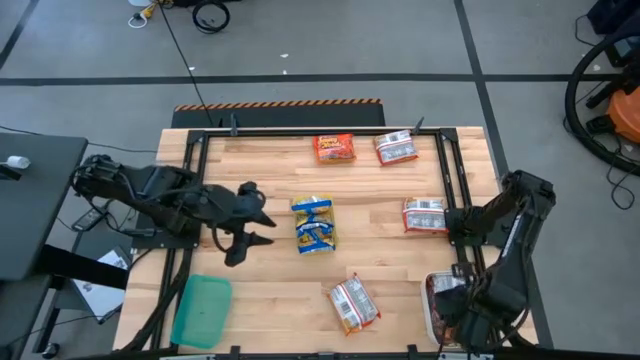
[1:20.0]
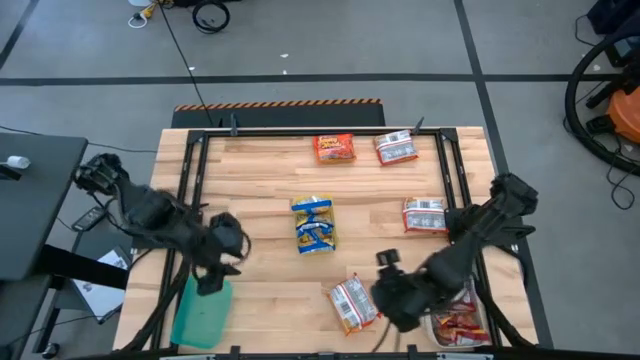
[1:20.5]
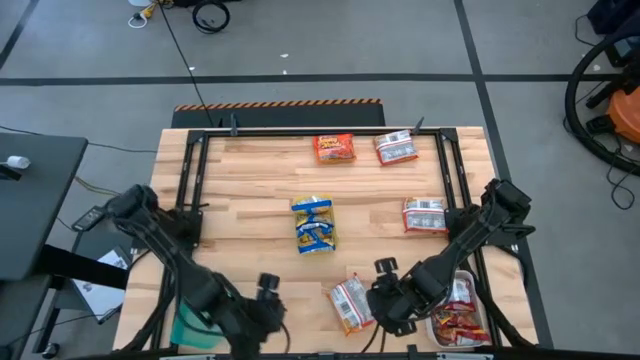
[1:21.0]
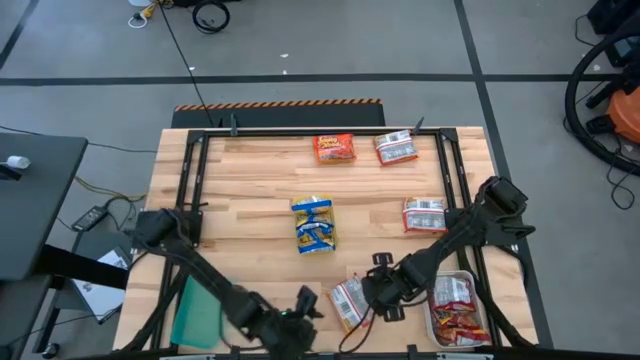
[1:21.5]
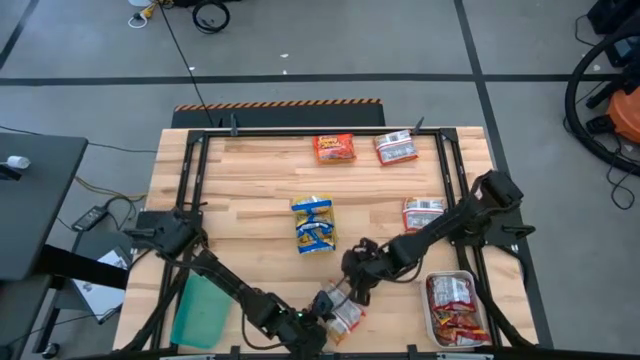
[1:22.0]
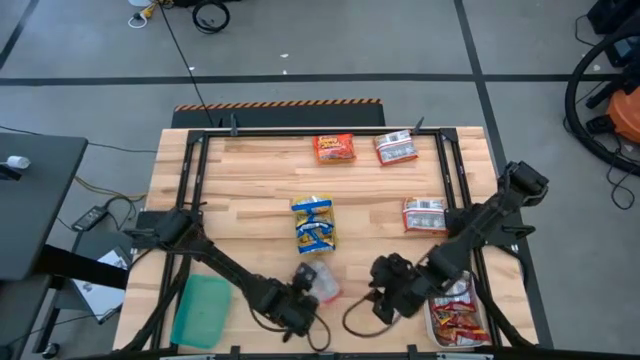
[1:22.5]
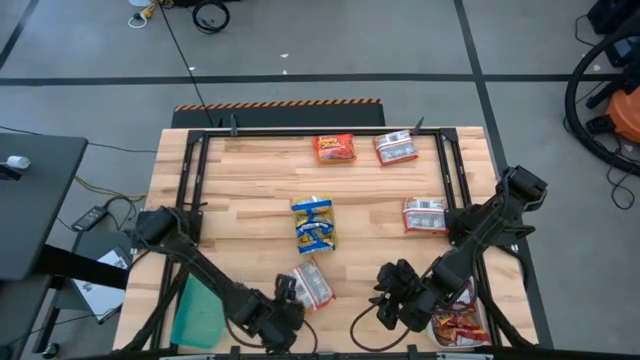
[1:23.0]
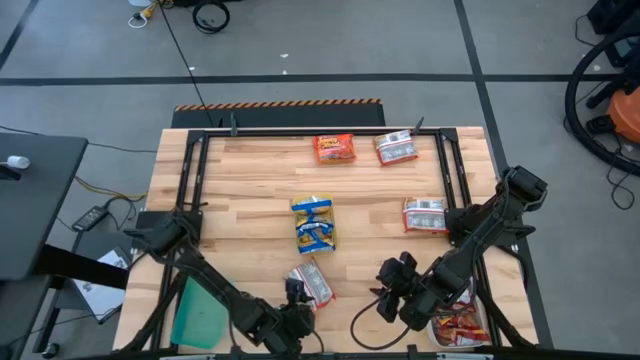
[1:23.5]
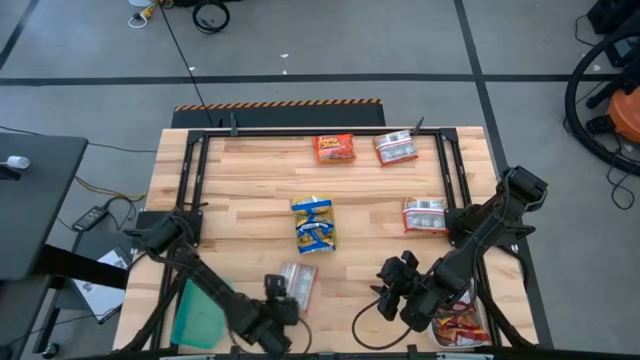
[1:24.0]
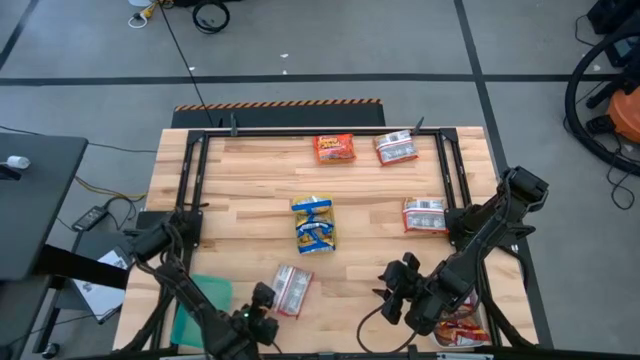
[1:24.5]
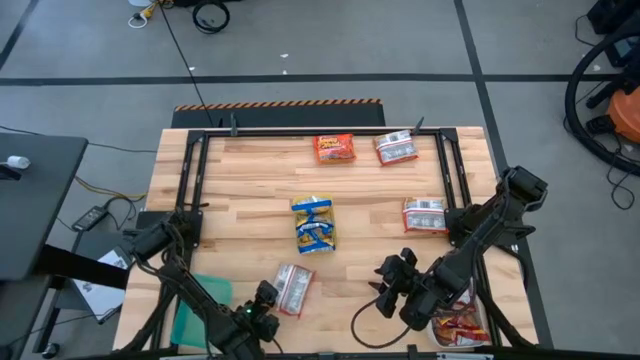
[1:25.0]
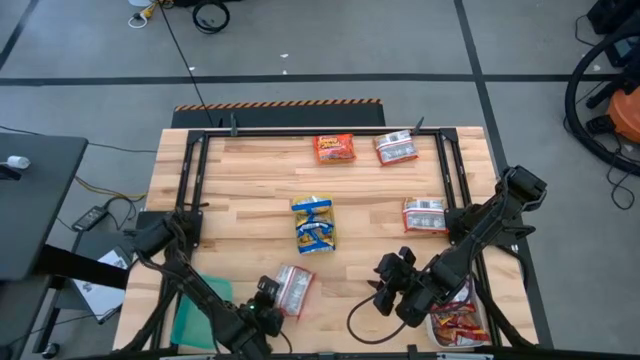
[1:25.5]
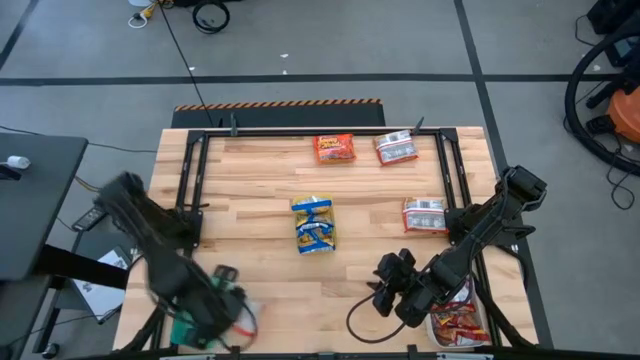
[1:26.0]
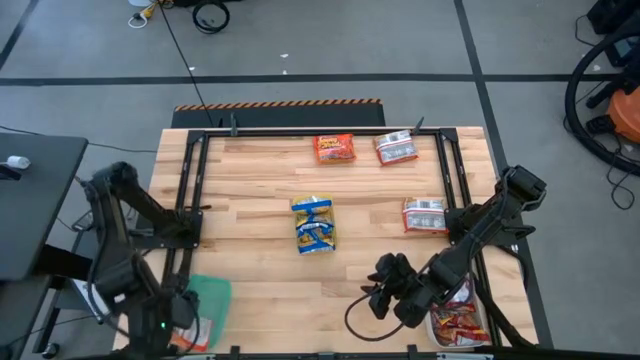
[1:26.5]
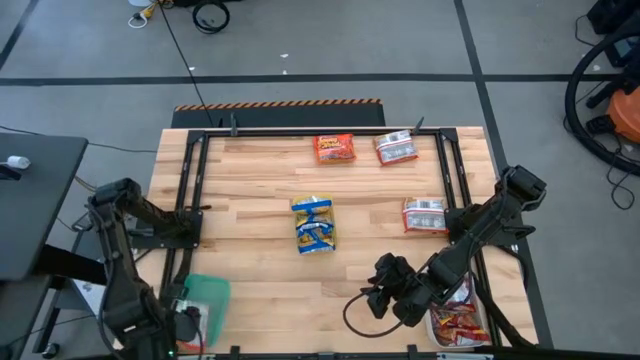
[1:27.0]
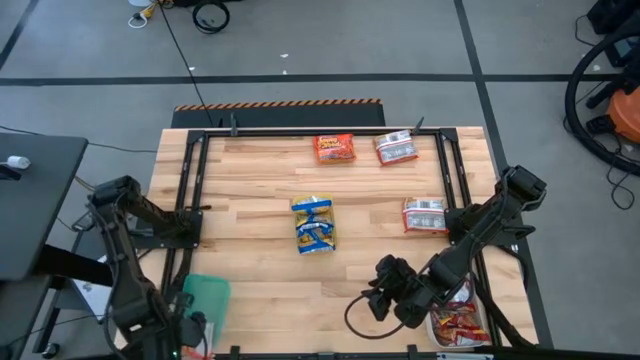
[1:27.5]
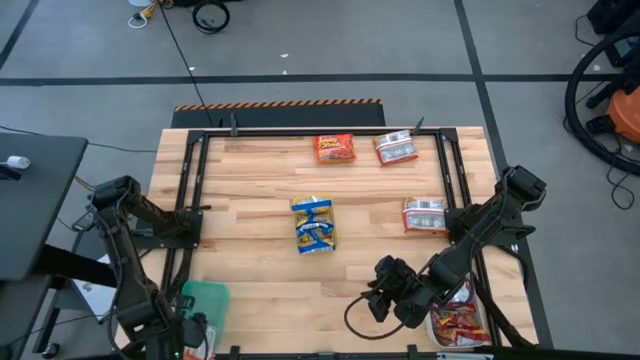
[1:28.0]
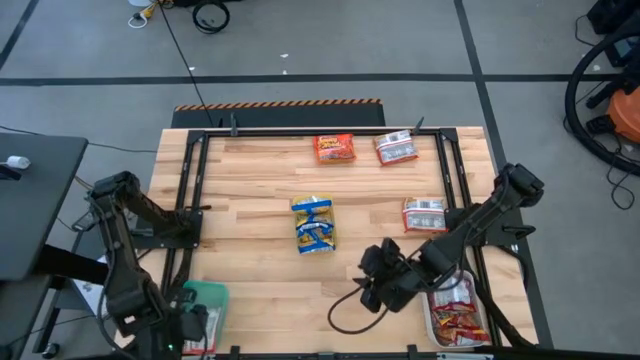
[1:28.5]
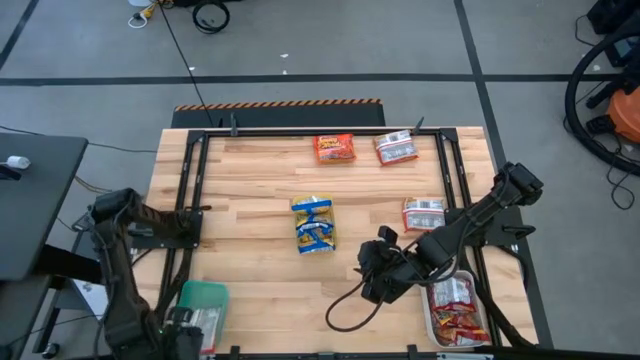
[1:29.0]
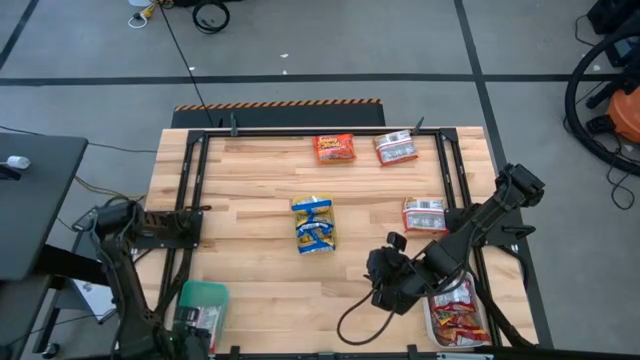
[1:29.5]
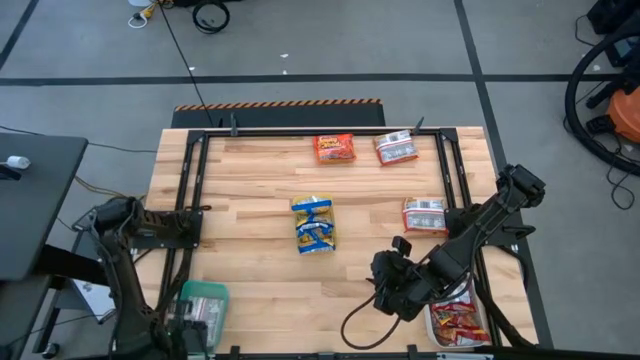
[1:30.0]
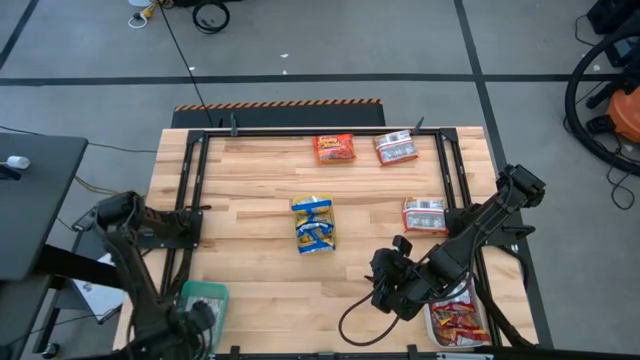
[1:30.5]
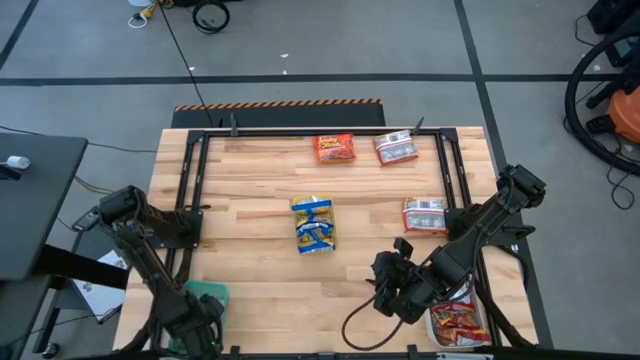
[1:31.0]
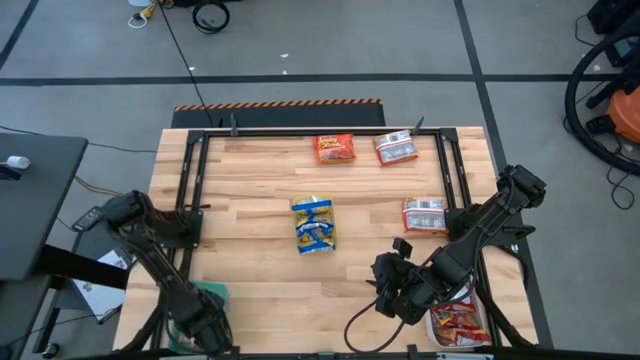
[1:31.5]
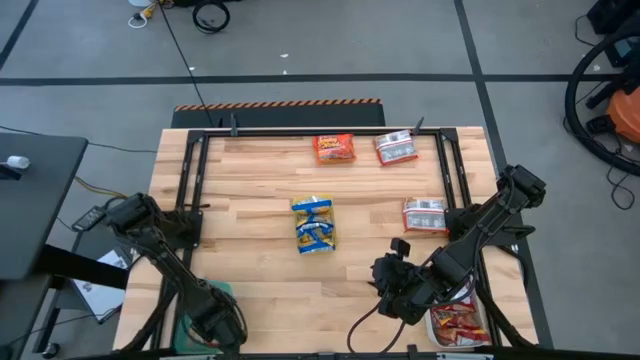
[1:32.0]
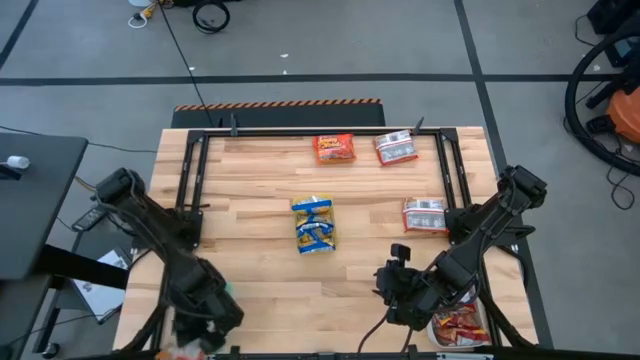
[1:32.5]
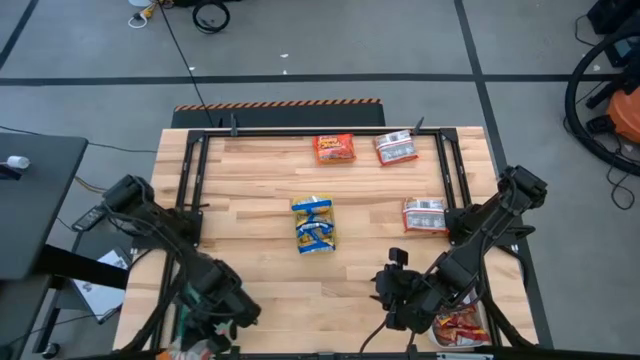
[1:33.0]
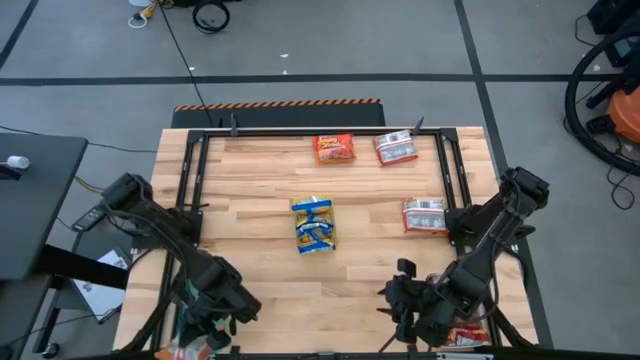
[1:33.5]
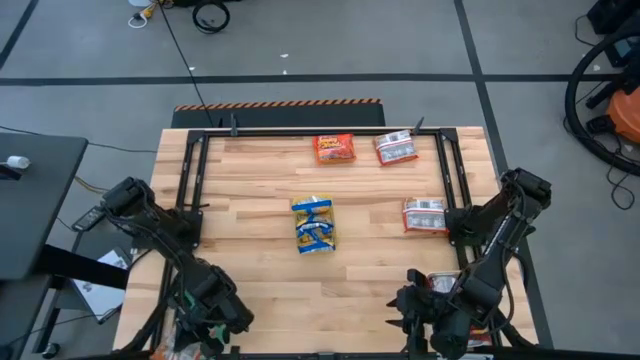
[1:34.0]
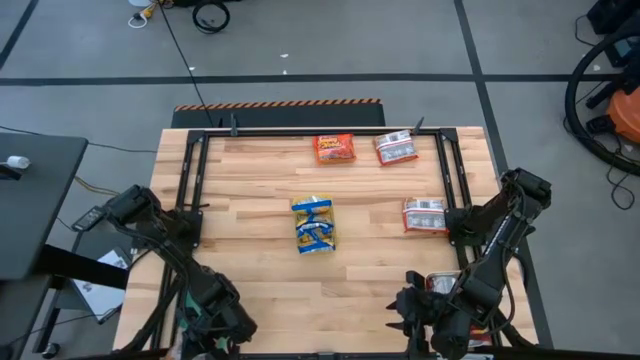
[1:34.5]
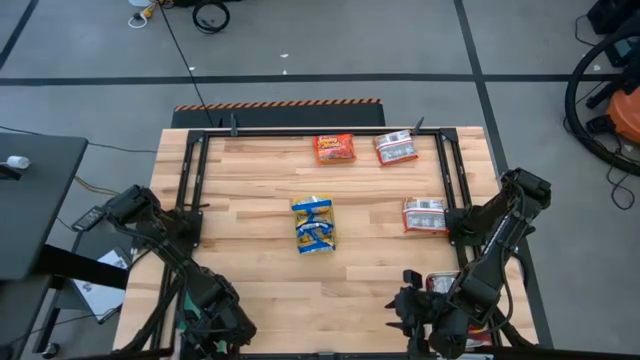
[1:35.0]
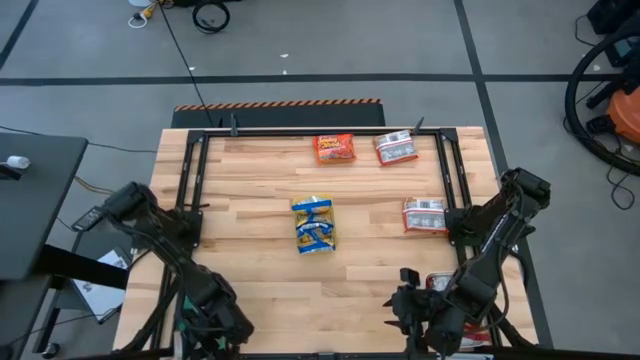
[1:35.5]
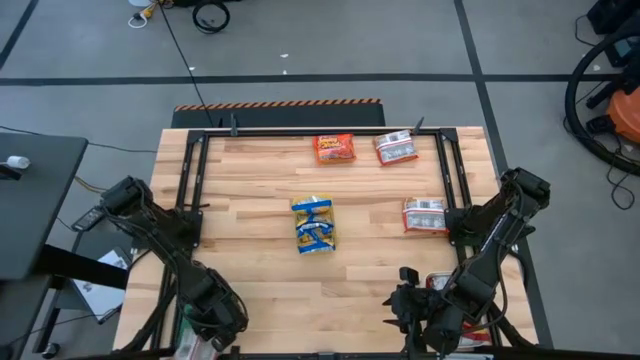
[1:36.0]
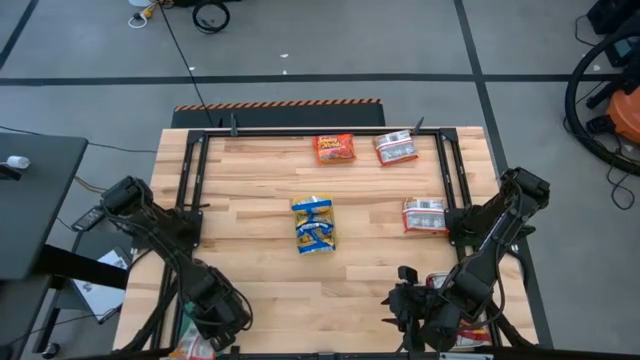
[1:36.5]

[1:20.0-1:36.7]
Task: Sort Maruchan noodles
Put the orange noodle pack into the green bin
